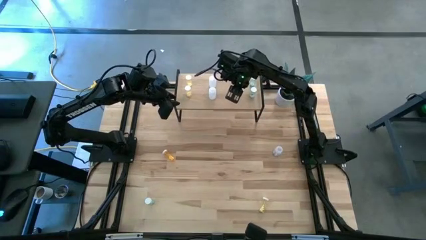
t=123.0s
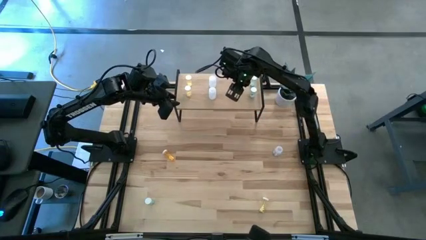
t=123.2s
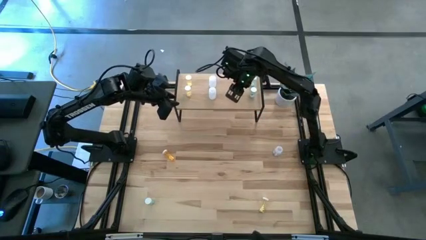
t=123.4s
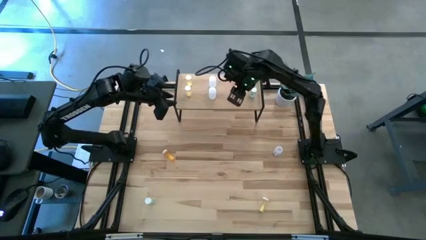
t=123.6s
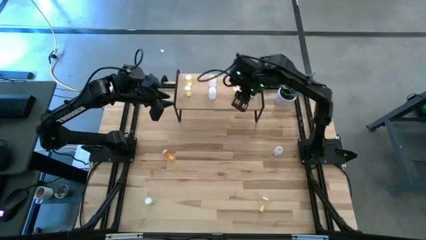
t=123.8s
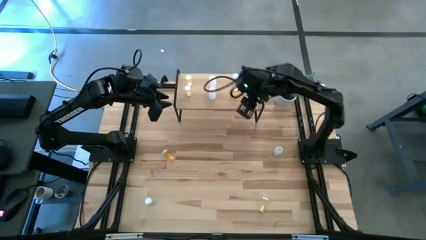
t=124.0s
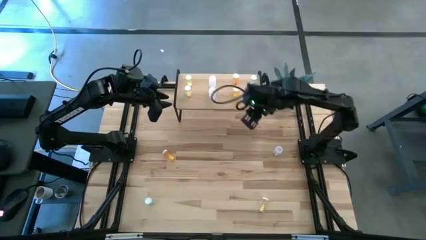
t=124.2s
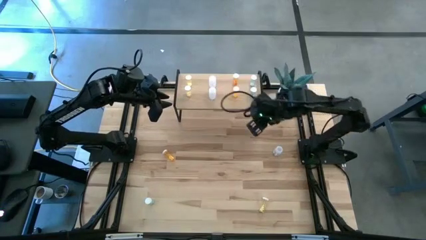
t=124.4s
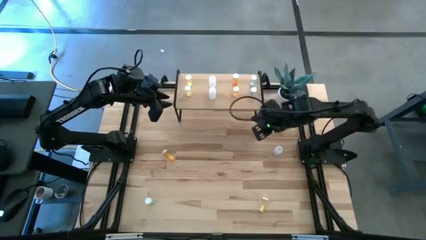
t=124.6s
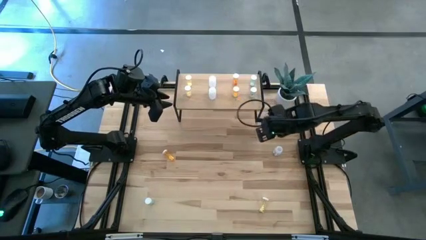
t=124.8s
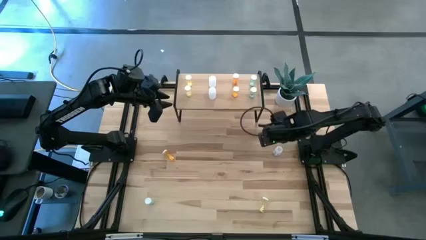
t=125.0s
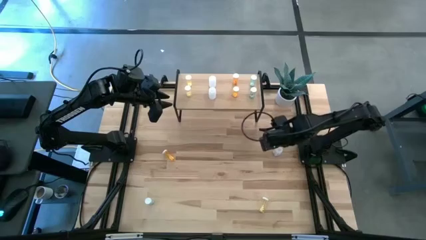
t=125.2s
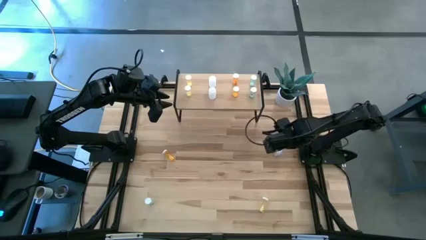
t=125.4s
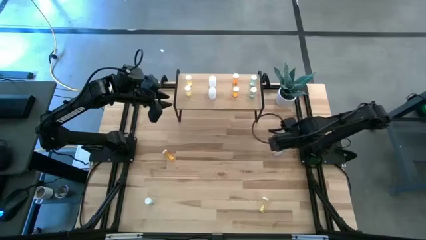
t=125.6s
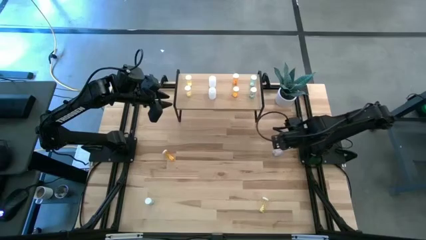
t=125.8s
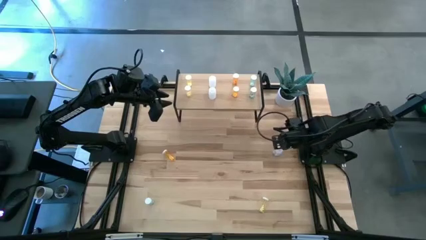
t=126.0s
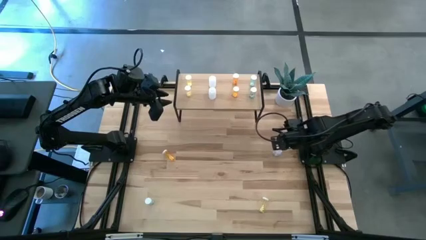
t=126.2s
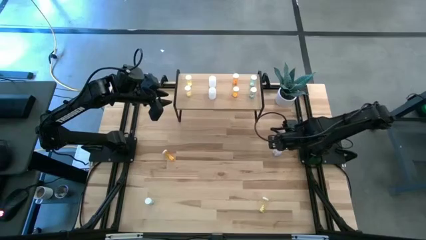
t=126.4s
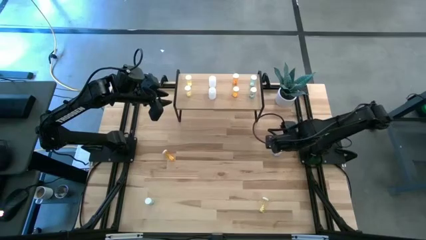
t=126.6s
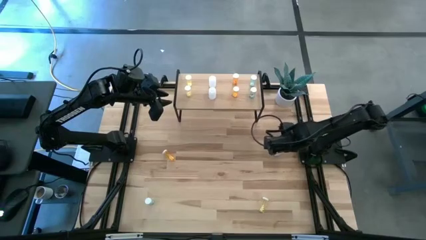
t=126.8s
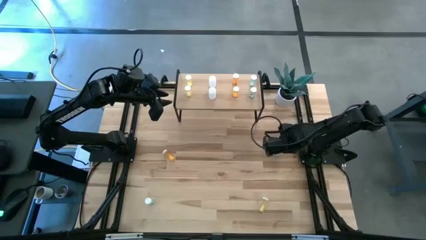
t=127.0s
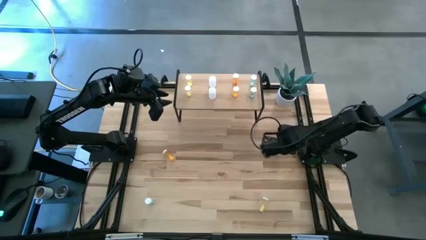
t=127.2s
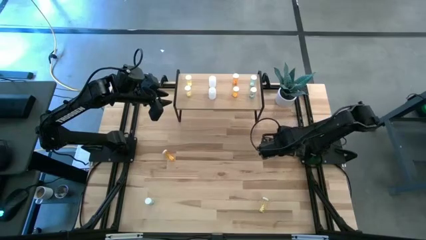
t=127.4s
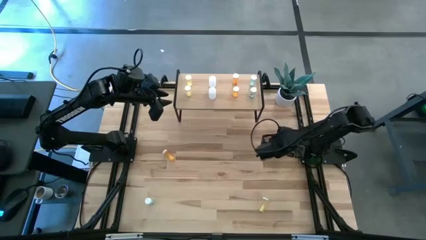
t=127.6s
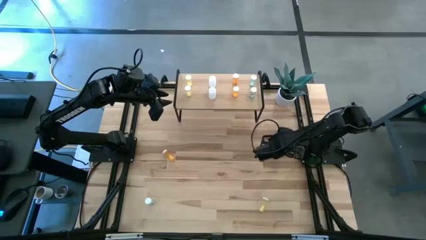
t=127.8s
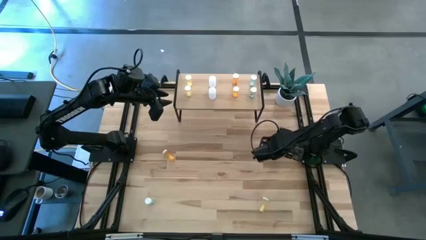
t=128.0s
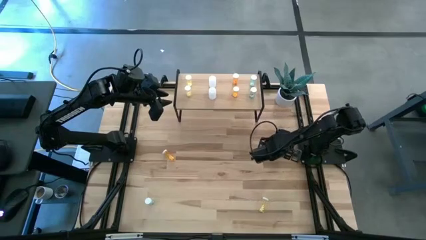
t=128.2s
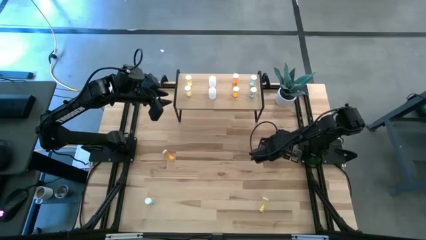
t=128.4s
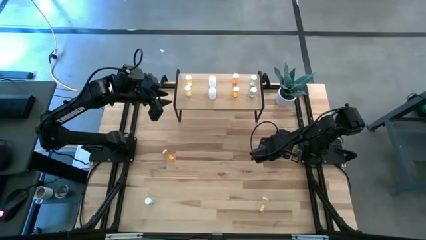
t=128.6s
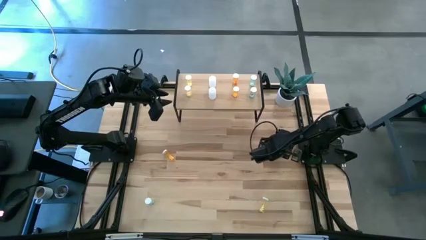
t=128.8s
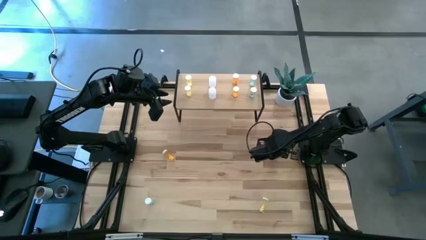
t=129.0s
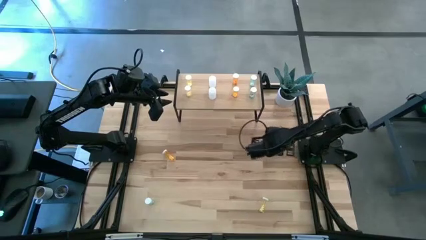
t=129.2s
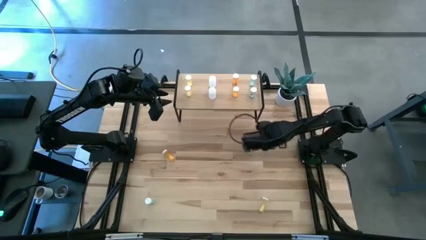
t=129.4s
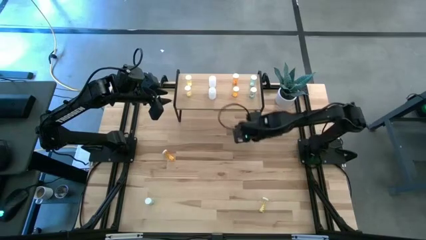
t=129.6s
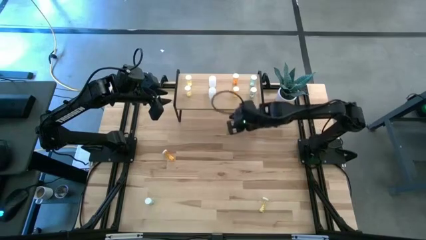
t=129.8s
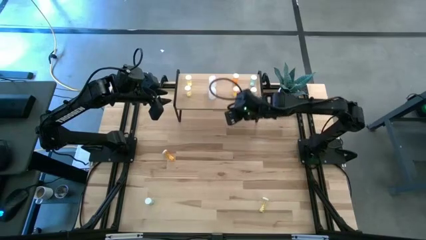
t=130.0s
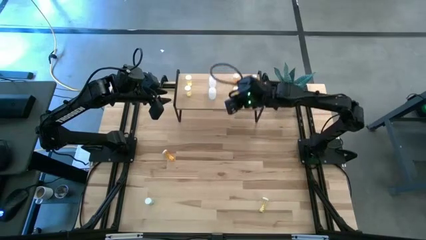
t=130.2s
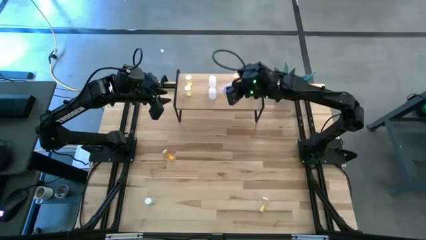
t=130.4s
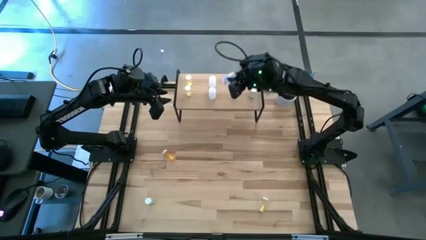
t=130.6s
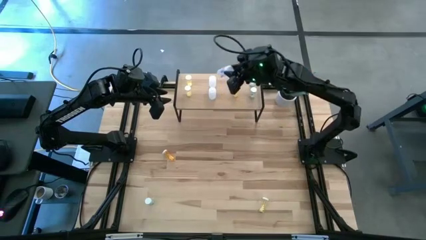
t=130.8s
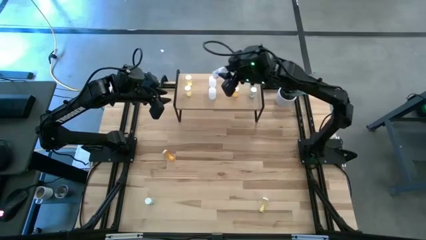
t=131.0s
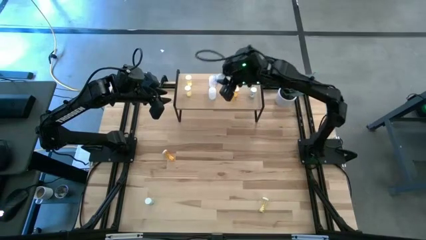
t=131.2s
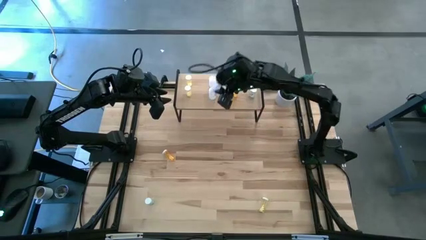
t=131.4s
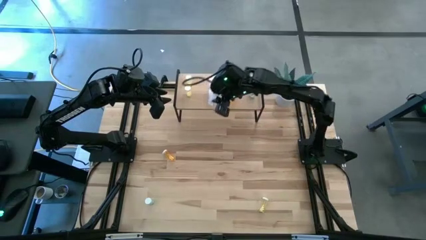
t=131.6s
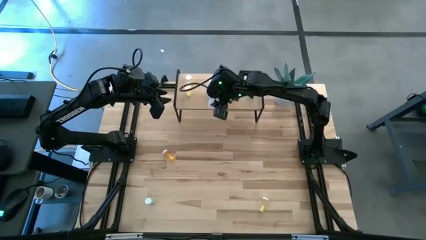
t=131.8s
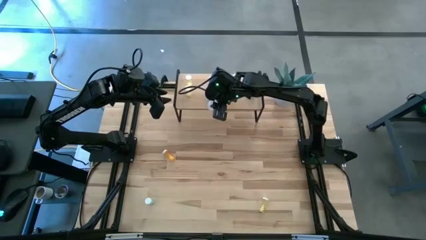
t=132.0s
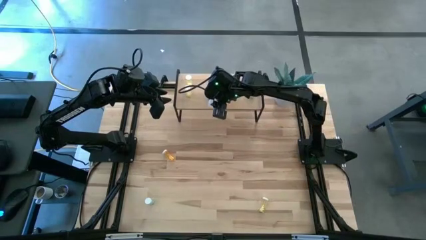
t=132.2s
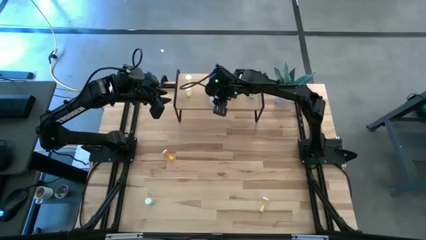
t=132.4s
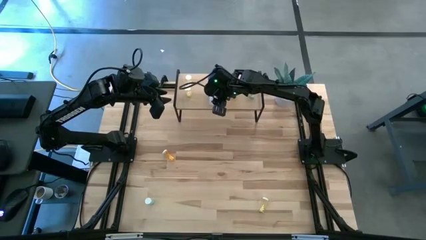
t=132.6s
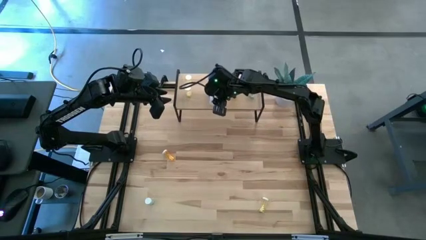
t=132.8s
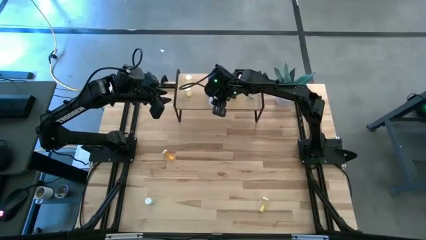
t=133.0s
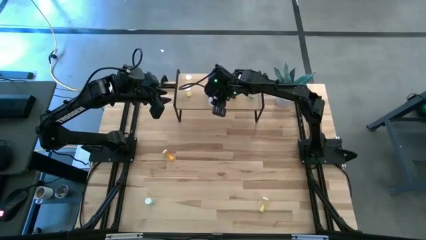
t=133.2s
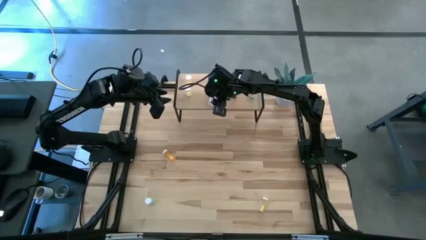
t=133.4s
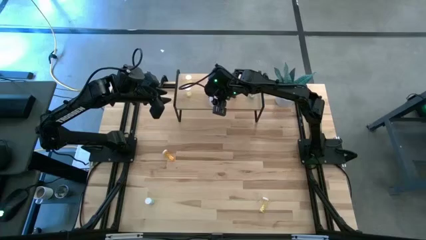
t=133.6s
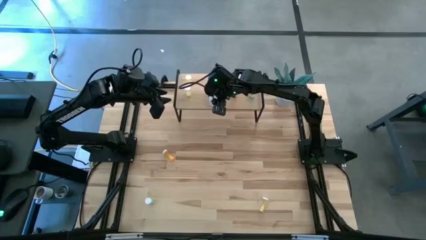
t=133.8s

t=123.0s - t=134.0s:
Task: Pick and place medicine bottles onto shelf by color
Put the white medicine bottle on the shelf aligned with the other white medicine bottles

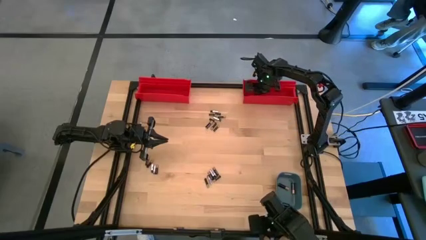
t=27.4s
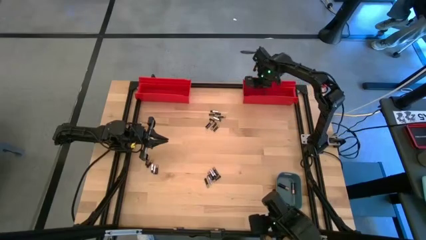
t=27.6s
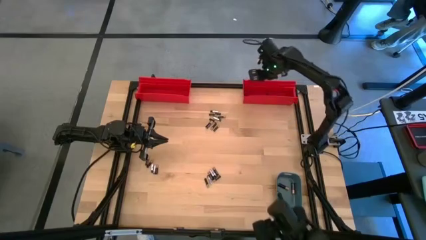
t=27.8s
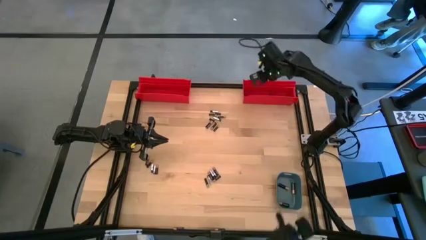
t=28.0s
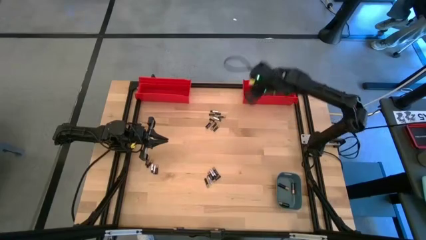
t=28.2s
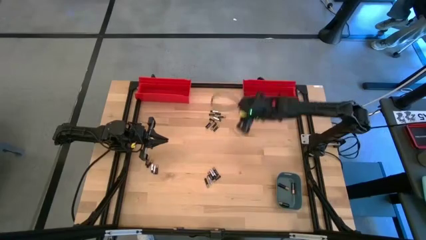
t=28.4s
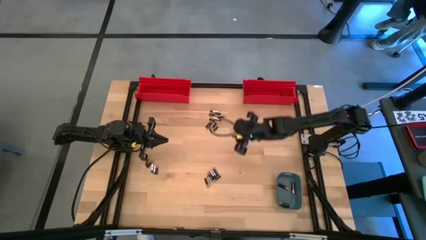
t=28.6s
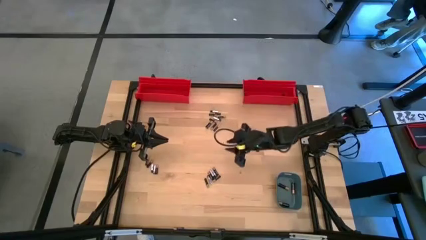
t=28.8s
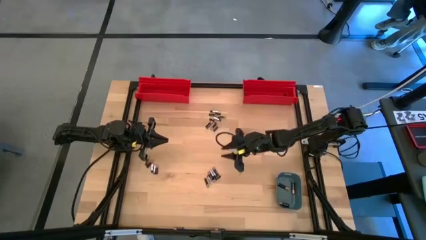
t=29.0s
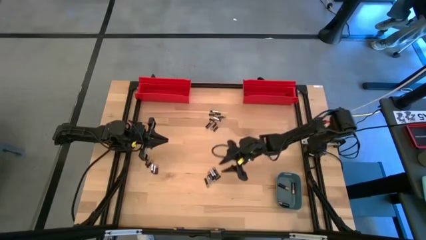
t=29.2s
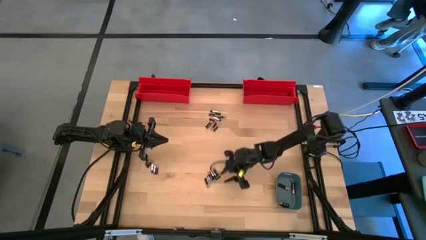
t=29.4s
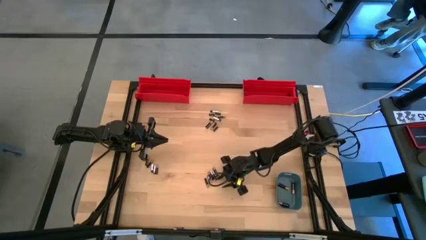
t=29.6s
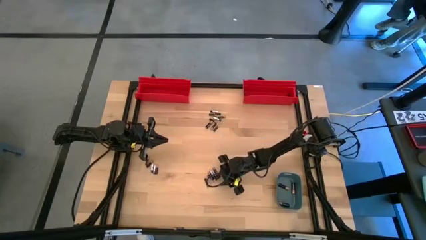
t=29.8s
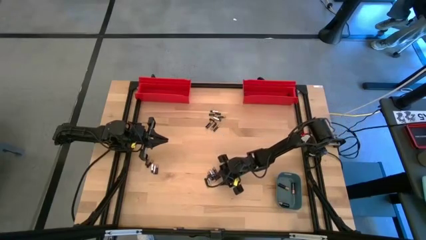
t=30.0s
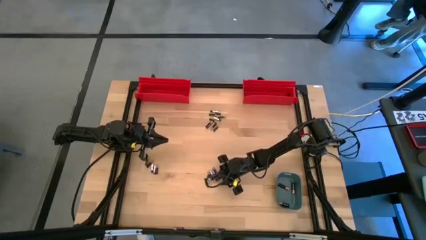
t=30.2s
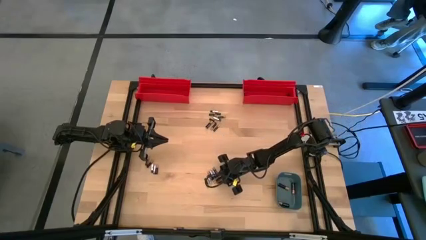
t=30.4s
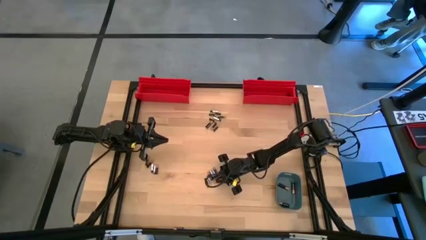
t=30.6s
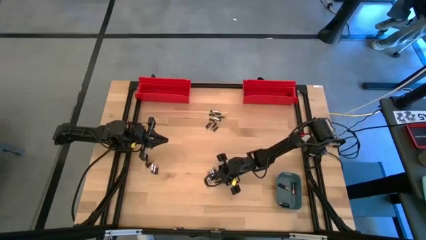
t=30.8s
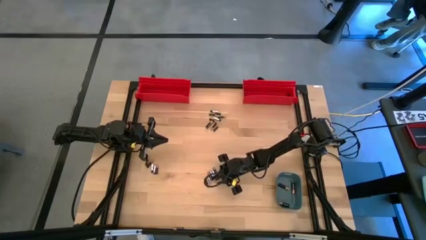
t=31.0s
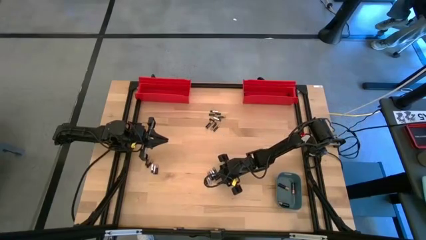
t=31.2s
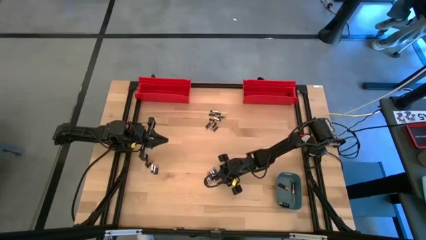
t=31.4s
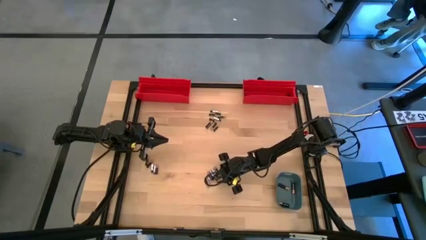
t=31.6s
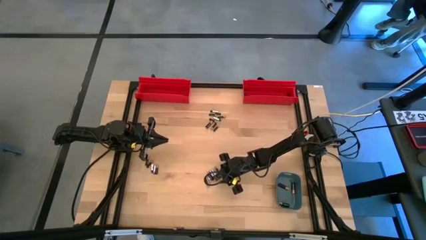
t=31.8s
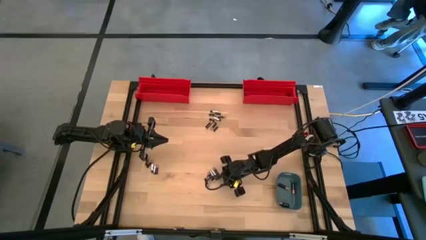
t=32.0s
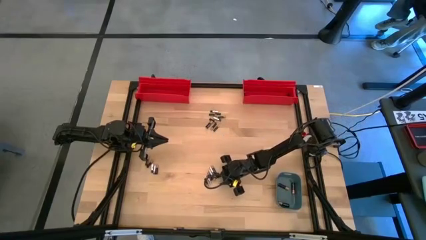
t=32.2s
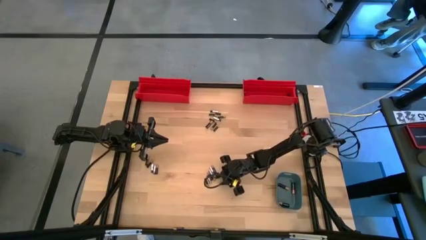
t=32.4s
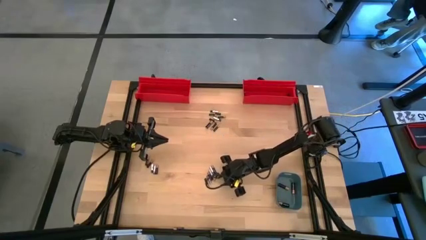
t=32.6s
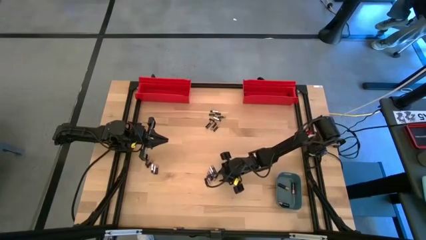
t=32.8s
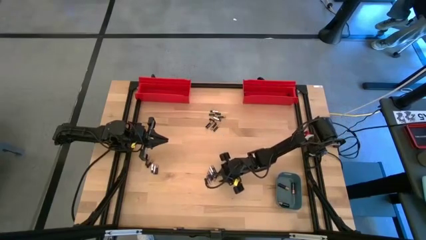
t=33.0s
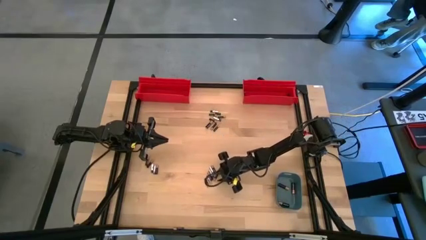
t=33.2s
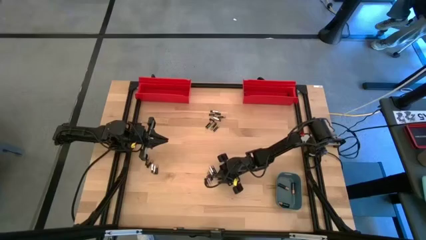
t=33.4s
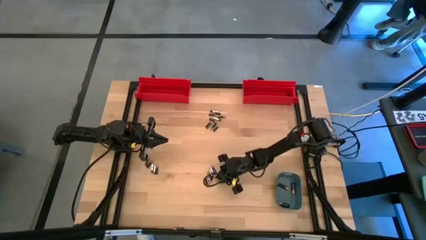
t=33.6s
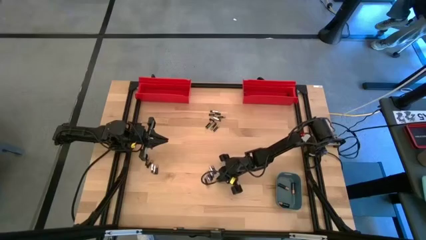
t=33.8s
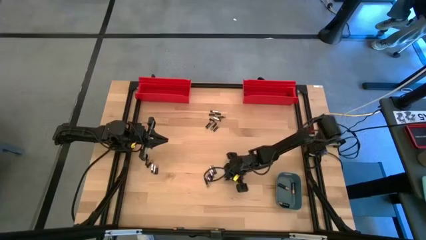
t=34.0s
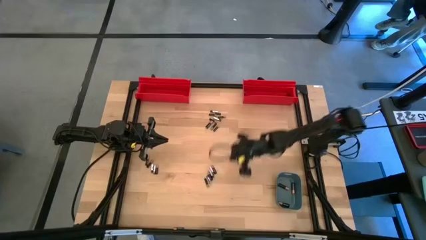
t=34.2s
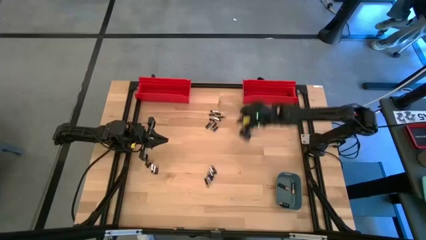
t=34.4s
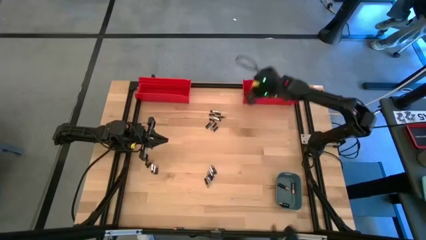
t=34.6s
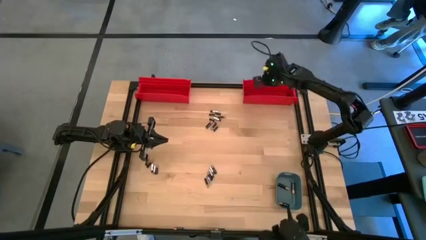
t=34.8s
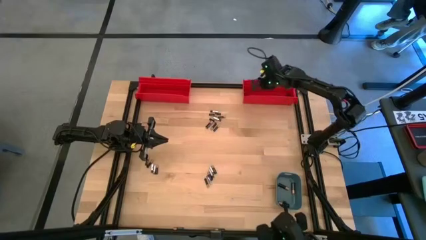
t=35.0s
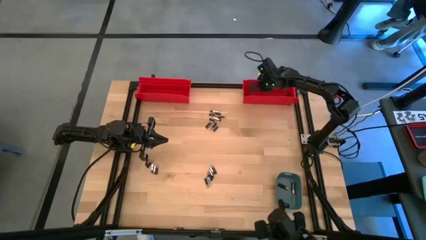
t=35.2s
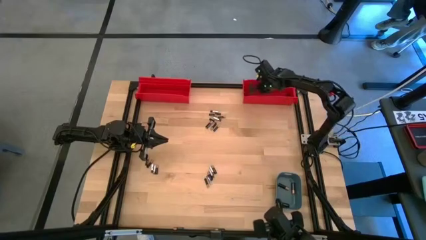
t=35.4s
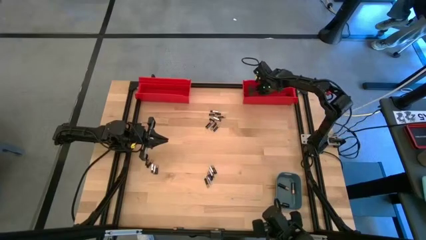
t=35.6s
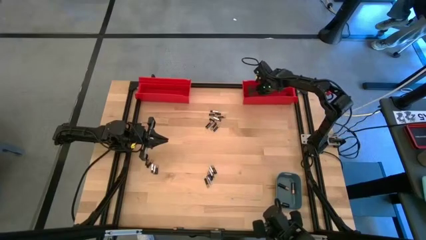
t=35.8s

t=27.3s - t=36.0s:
Task: Sort batteries
Put the small black battery into the right red bin
